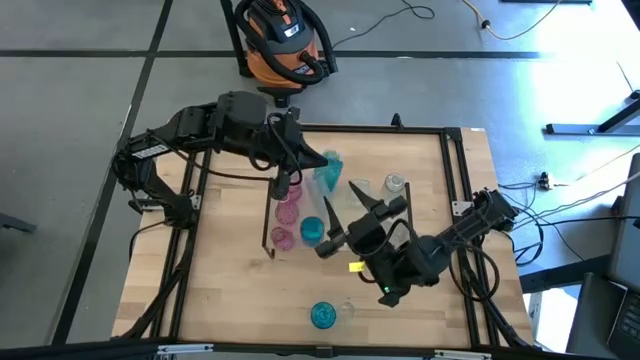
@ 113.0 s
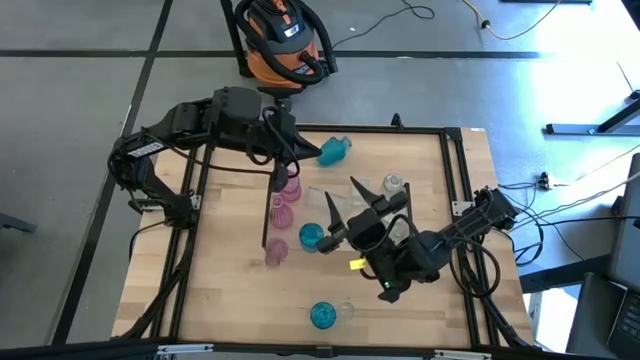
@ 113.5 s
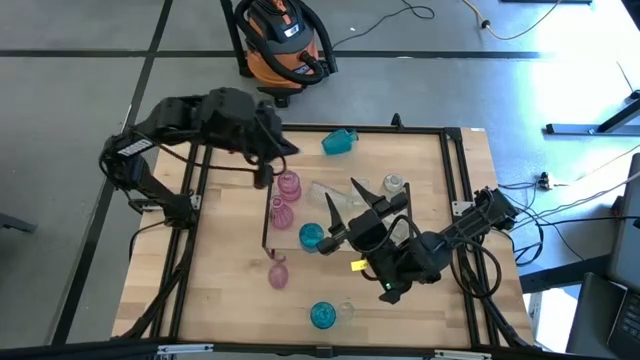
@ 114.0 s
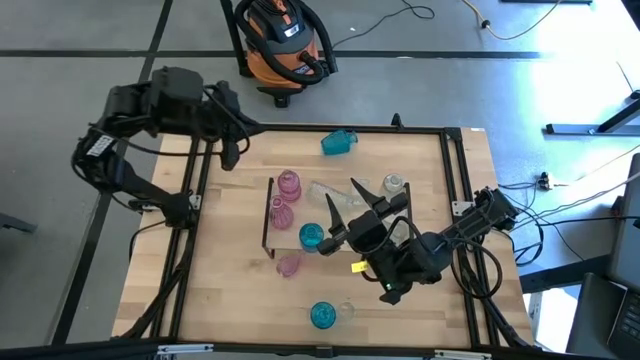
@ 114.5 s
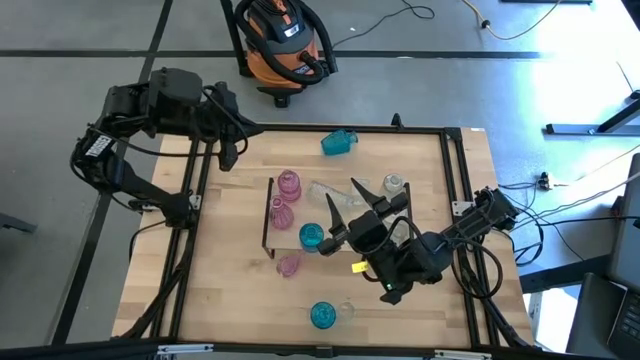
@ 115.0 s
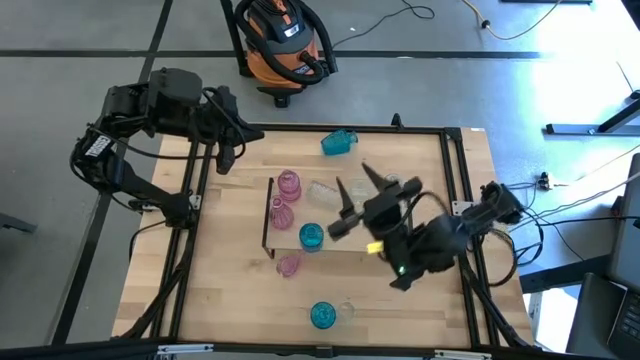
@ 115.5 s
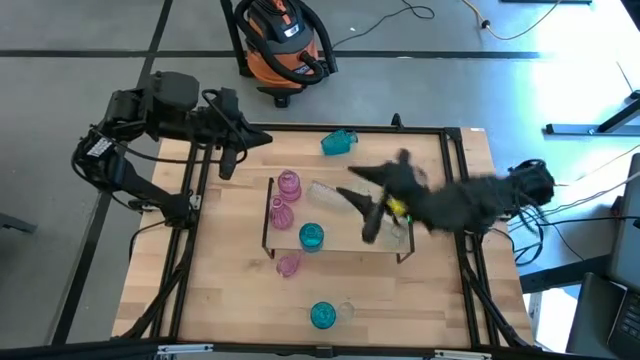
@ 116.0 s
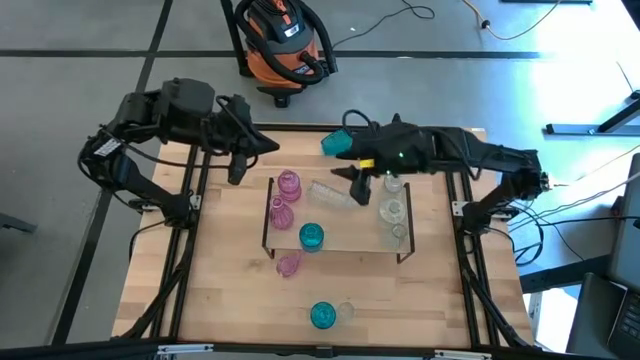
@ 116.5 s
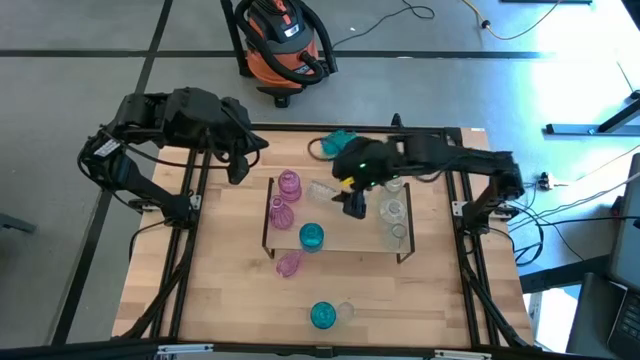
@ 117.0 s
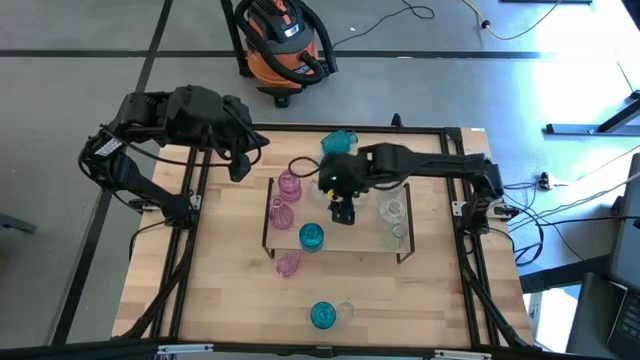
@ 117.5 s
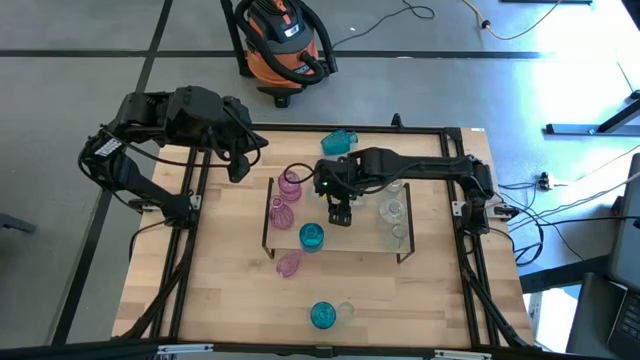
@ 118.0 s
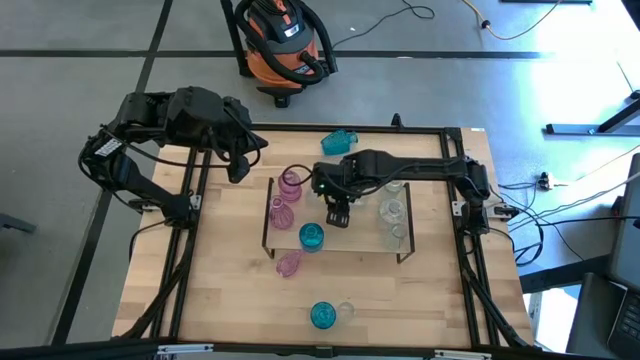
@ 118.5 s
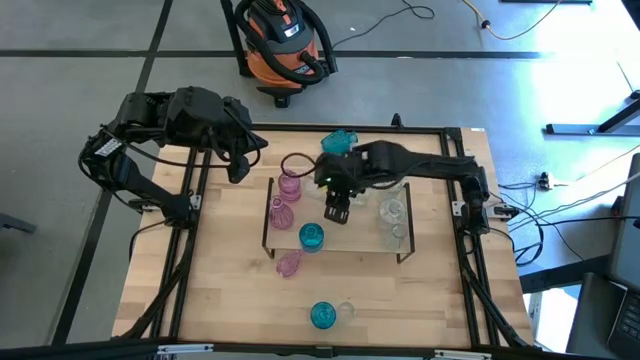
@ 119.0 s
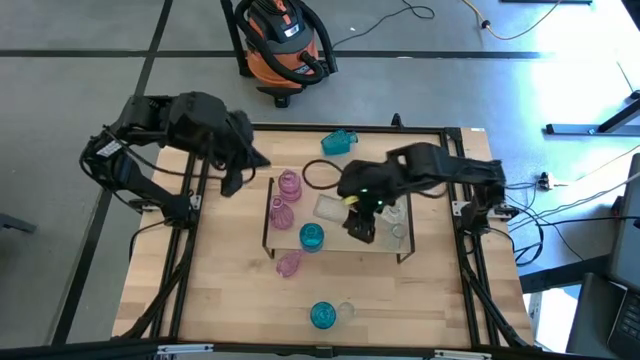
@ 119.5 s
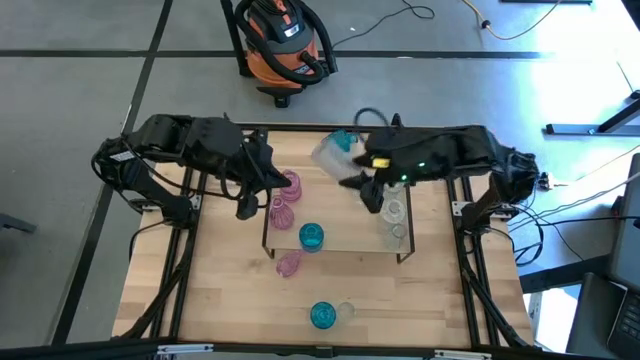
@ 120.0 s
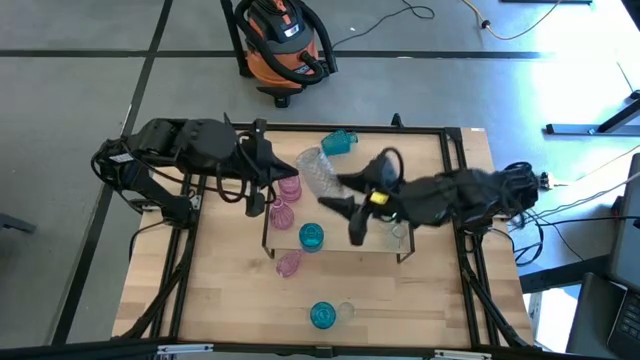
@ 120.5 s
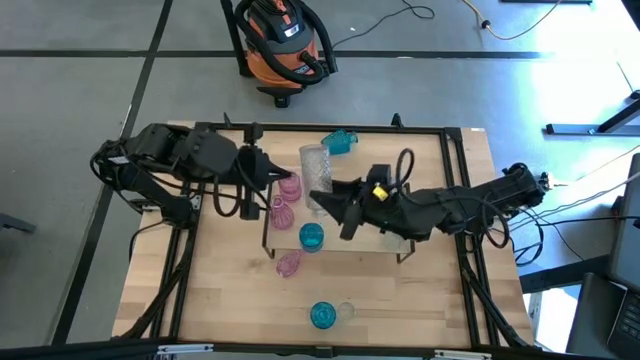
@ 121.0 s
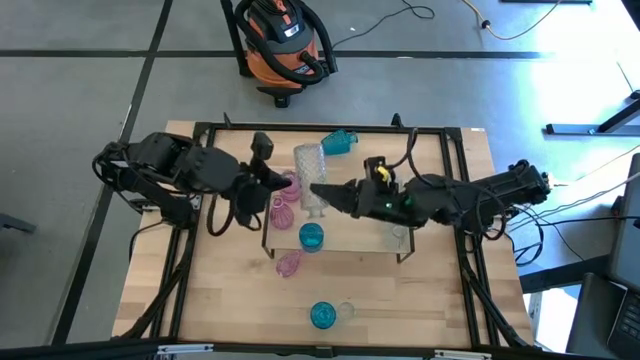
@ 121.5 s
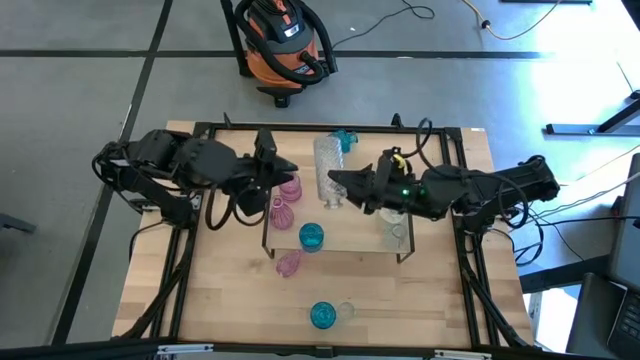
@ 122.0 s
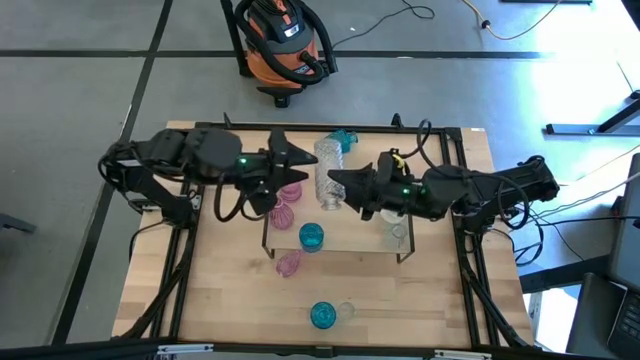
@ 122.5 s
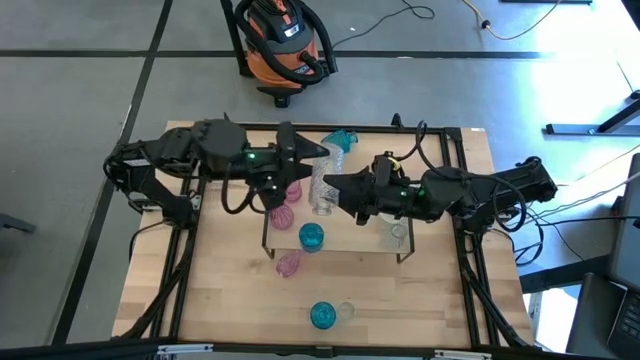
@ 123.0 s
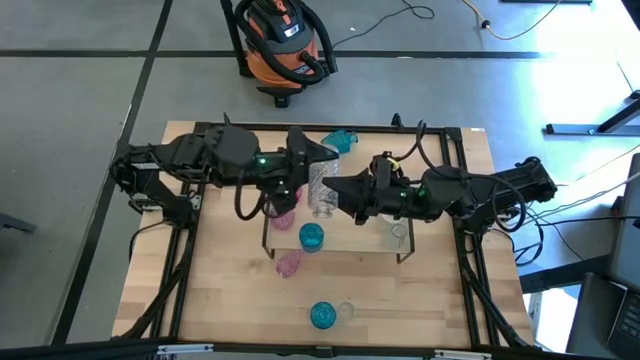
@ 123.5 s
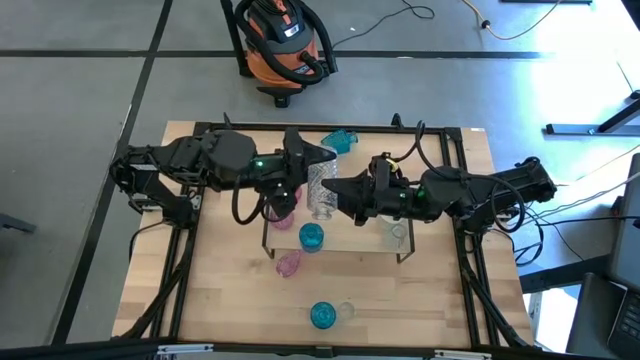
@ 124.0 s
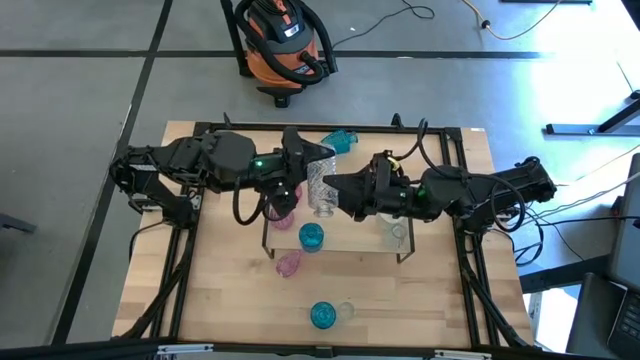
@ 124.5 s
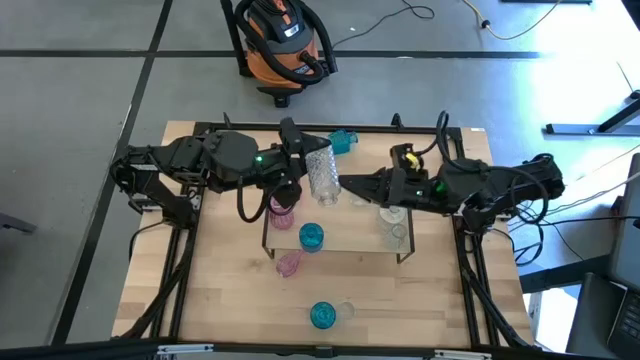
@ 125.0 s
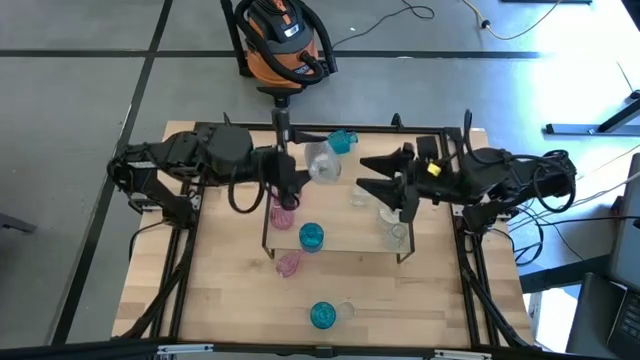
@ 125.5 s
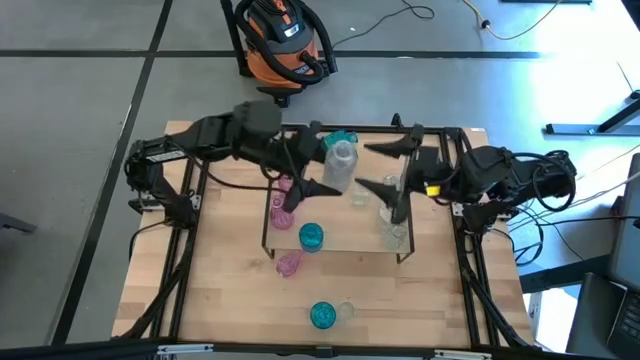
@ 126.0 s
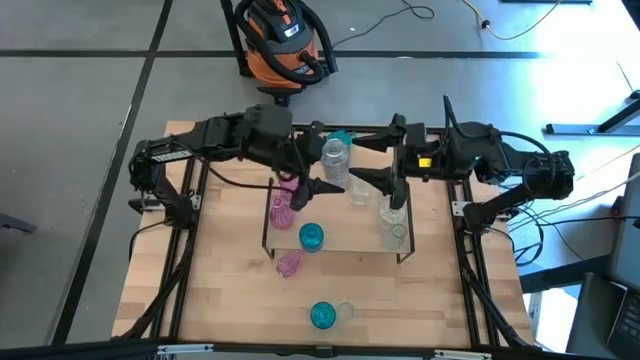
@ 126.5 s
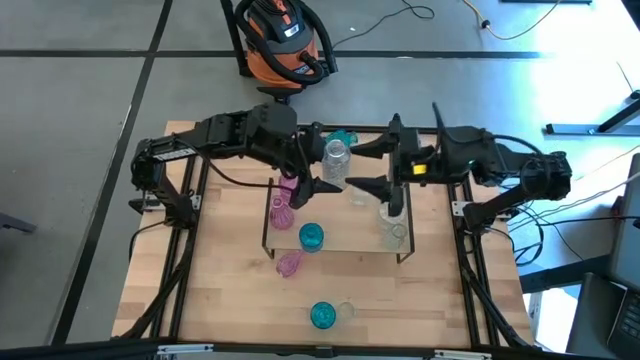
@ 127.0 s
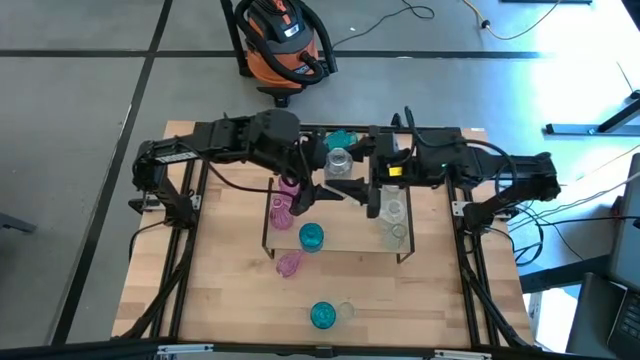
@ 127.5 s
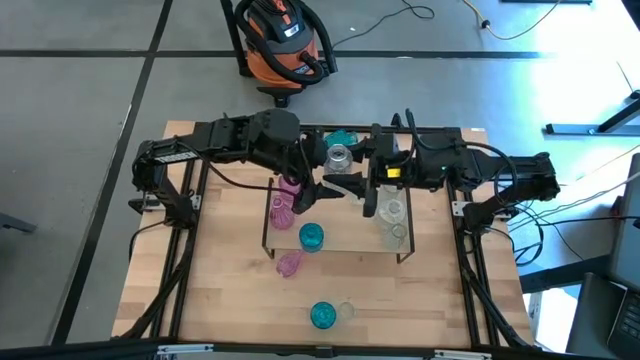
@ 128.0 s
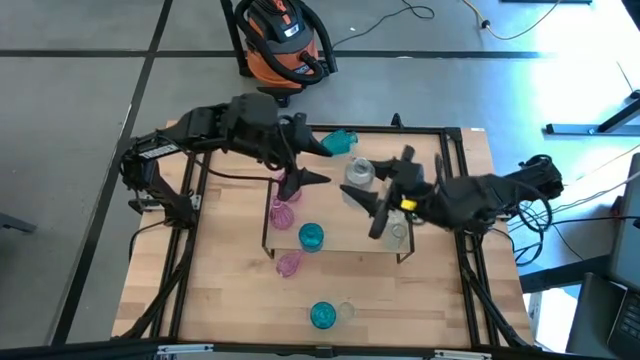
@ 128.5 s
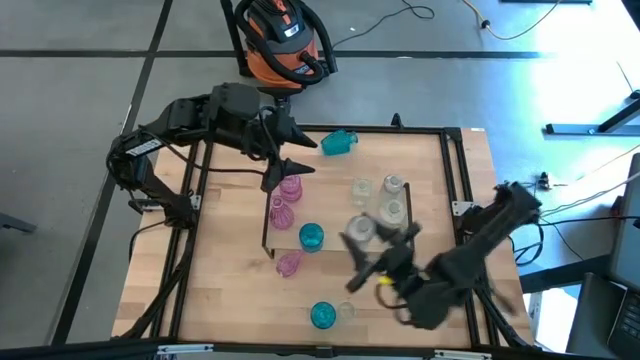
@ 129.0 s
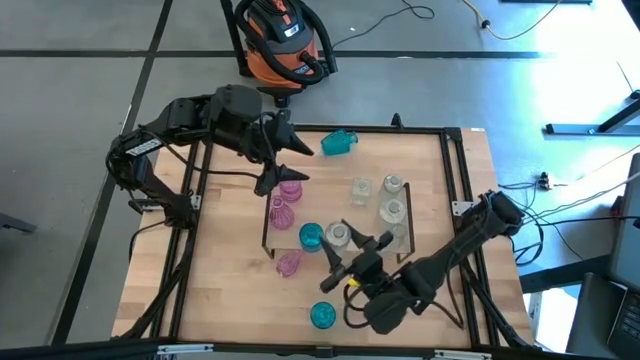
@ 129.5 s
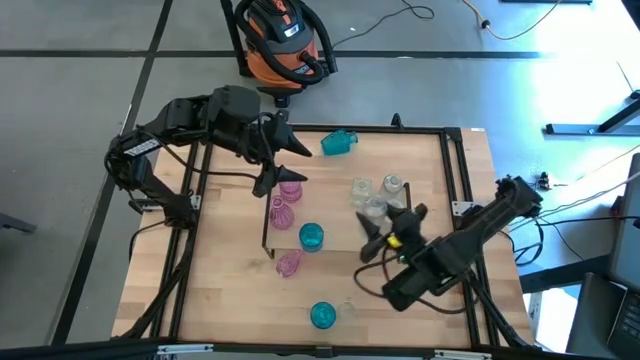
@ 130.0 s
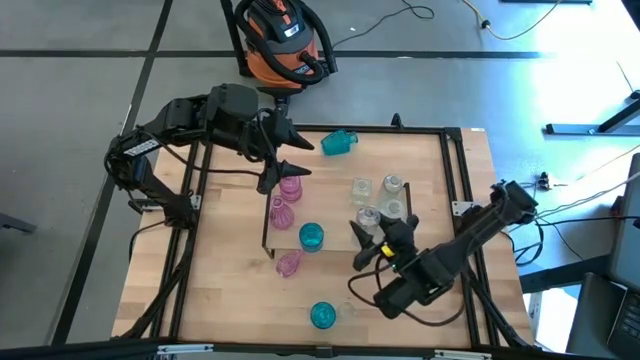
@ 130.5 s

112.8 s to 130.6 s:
Task: sort vases onto shelf
Put the transparent vase on the shelf aligned with the other transparent vase
